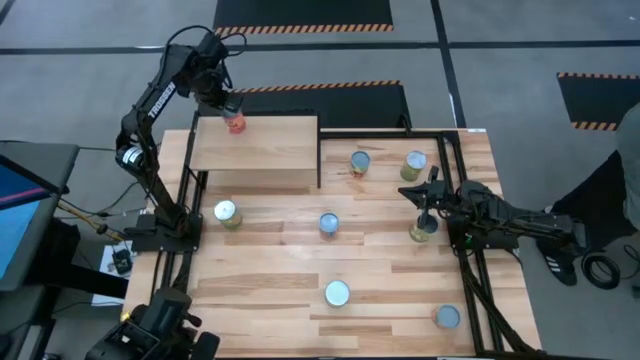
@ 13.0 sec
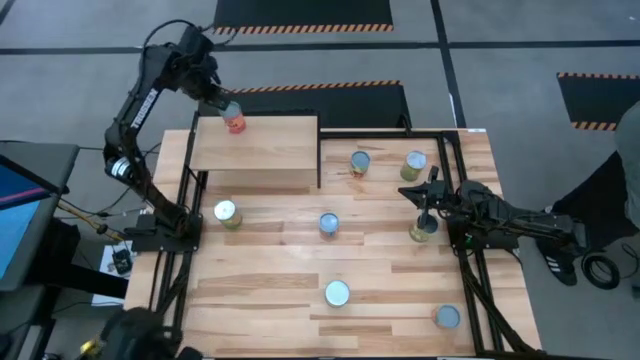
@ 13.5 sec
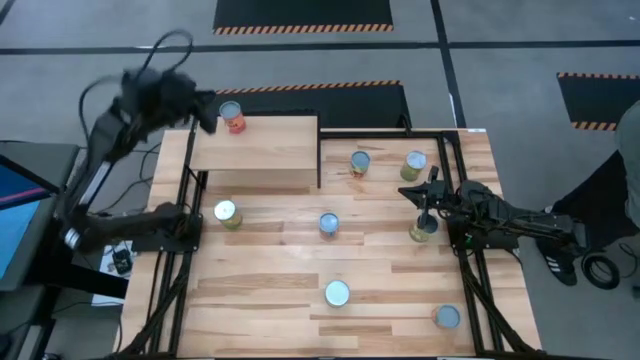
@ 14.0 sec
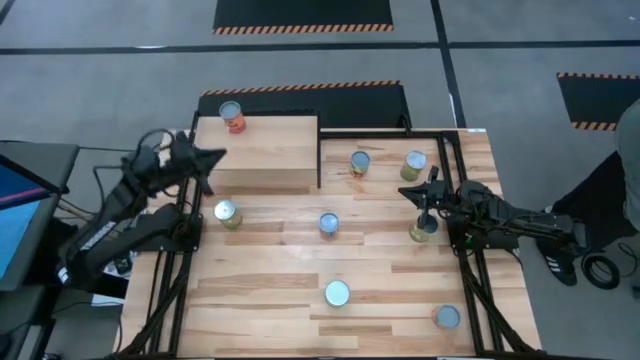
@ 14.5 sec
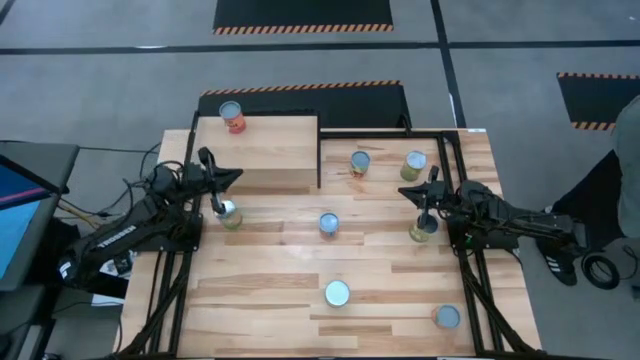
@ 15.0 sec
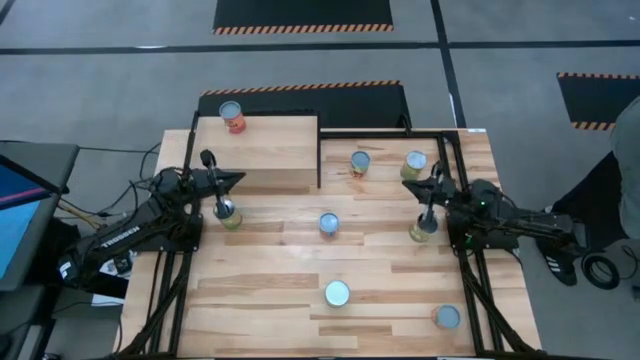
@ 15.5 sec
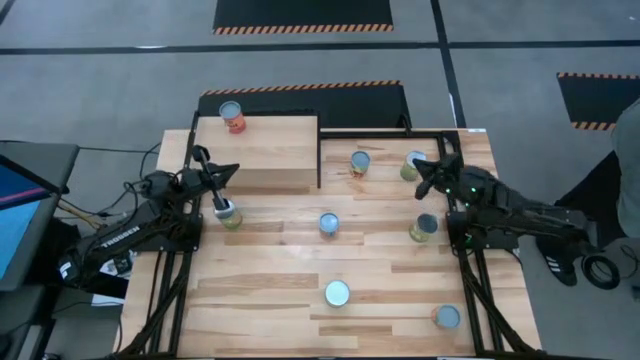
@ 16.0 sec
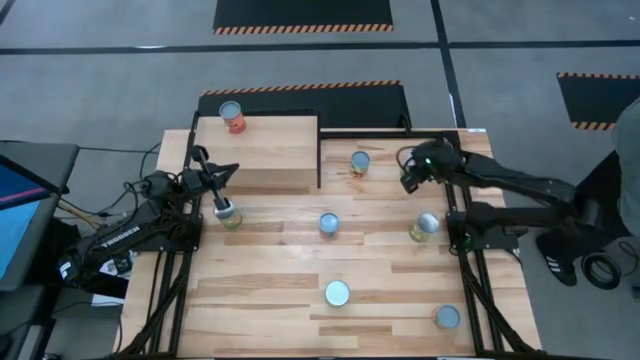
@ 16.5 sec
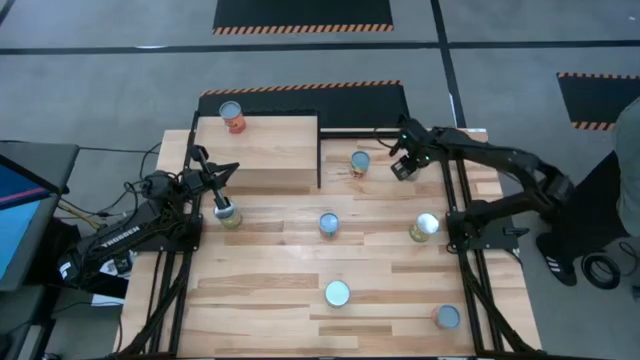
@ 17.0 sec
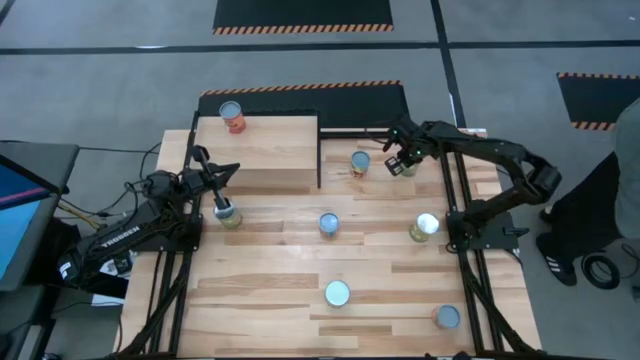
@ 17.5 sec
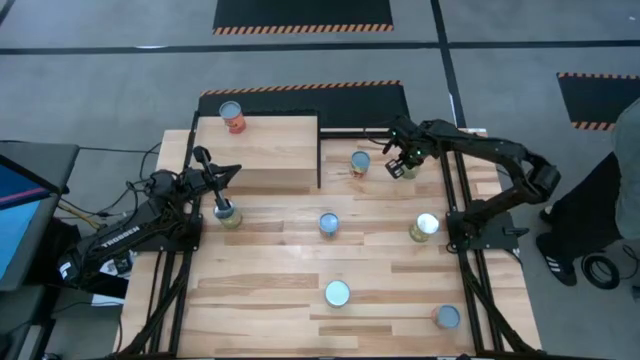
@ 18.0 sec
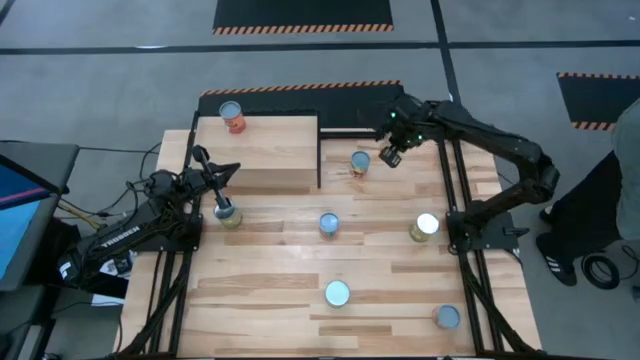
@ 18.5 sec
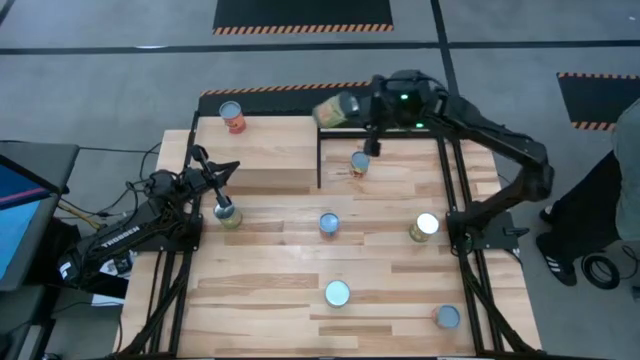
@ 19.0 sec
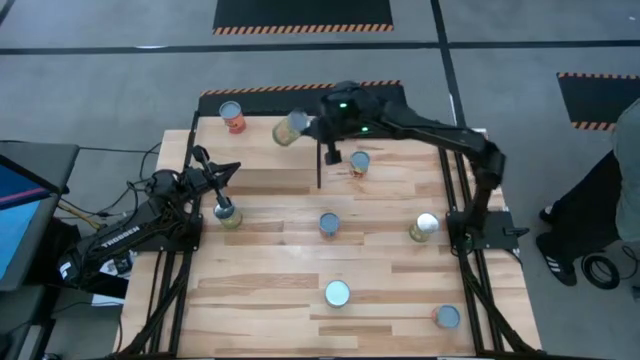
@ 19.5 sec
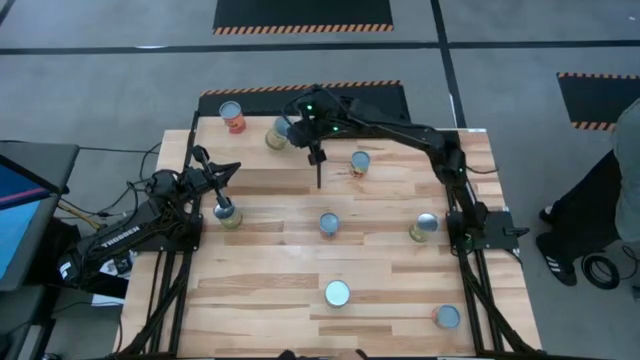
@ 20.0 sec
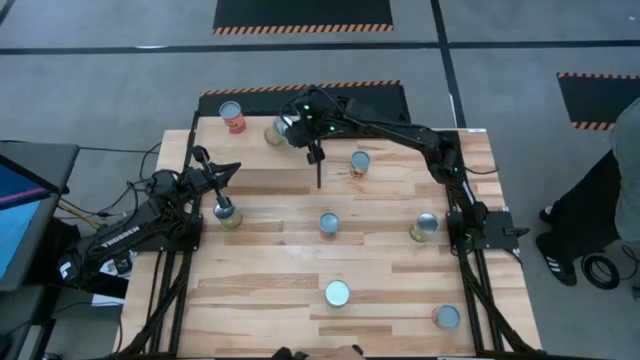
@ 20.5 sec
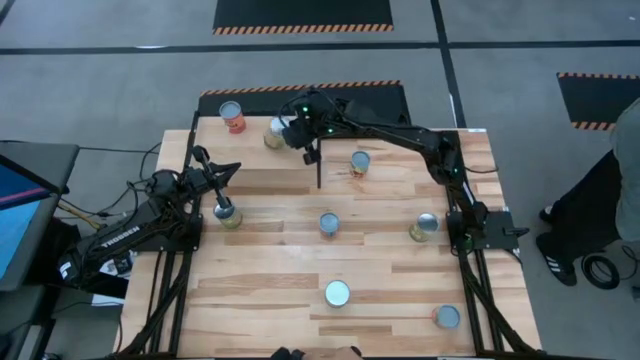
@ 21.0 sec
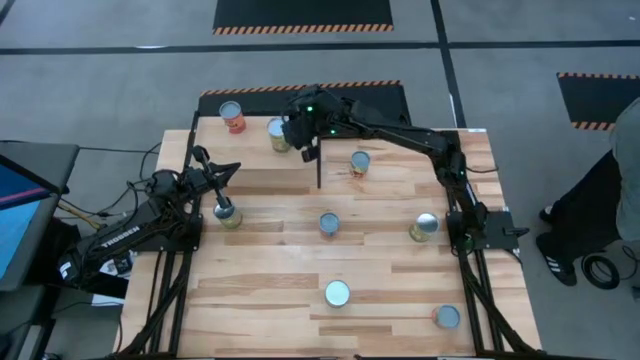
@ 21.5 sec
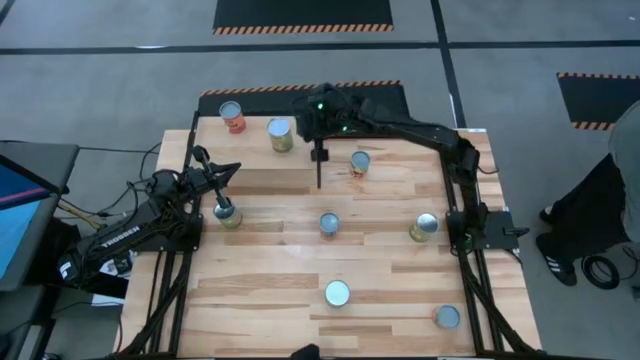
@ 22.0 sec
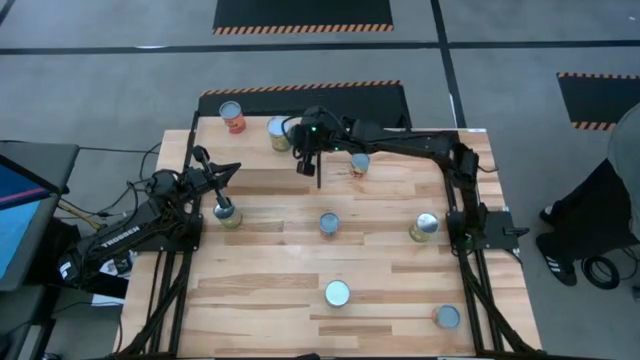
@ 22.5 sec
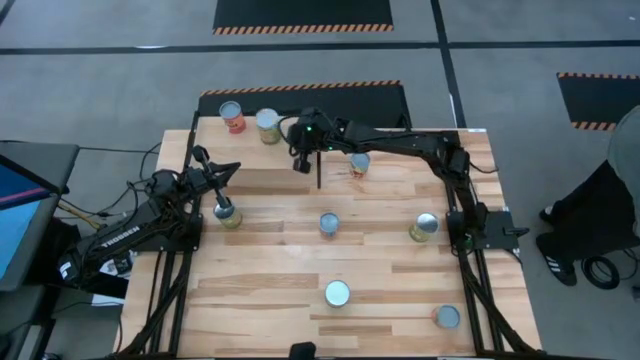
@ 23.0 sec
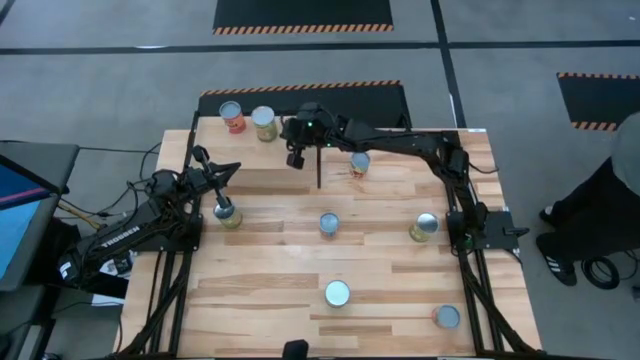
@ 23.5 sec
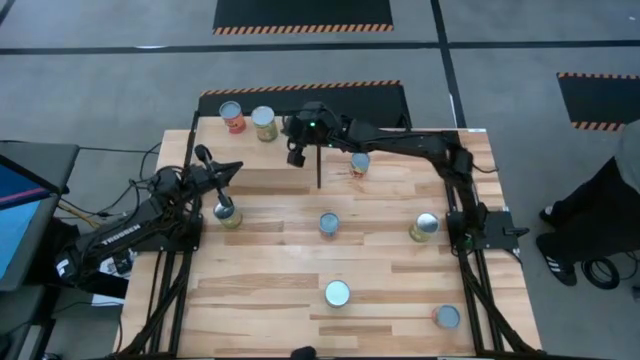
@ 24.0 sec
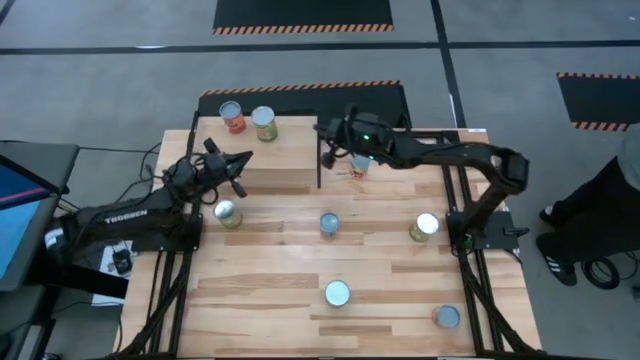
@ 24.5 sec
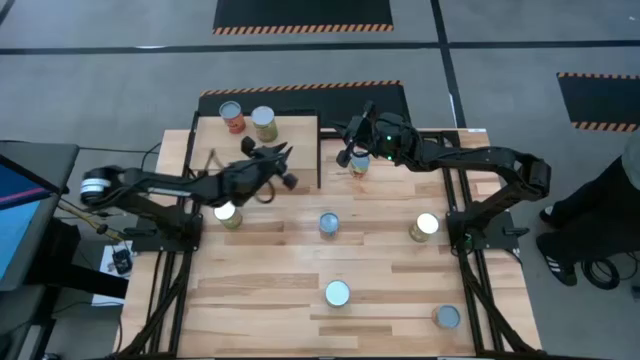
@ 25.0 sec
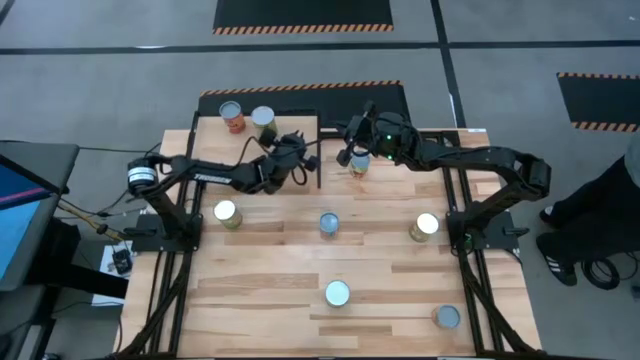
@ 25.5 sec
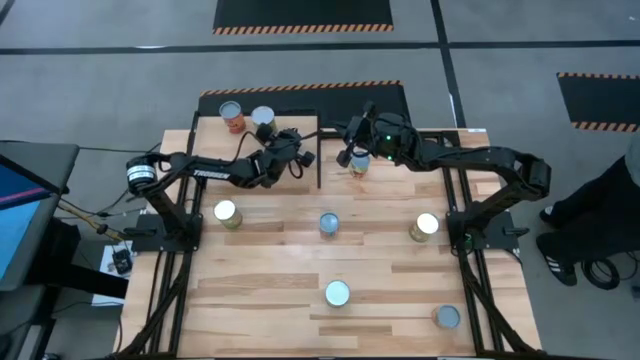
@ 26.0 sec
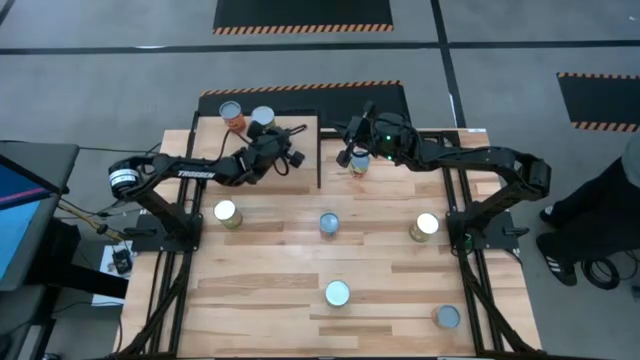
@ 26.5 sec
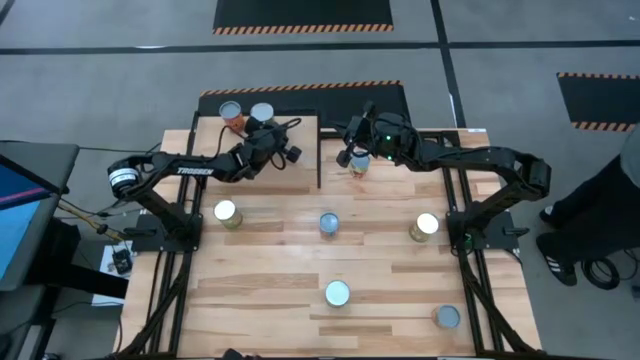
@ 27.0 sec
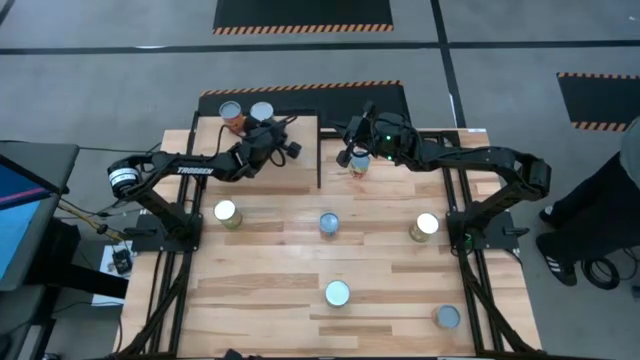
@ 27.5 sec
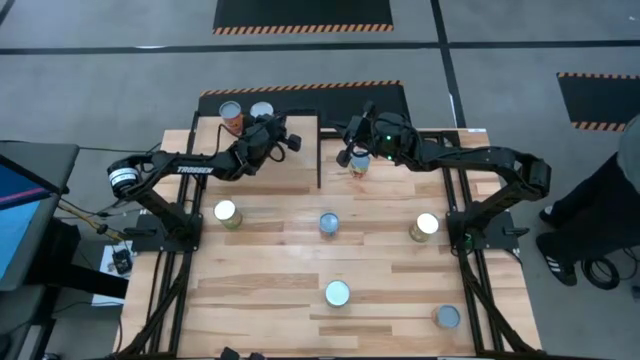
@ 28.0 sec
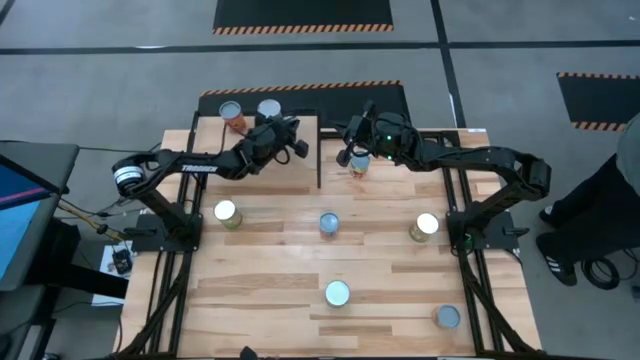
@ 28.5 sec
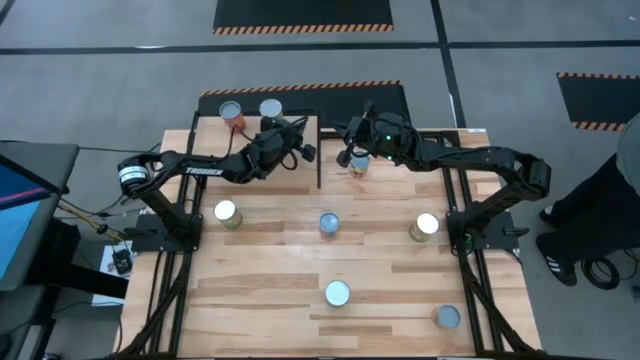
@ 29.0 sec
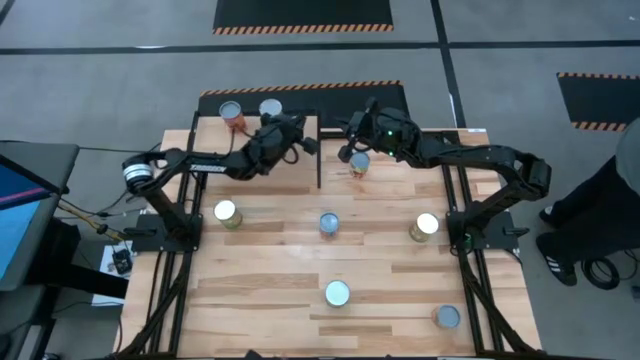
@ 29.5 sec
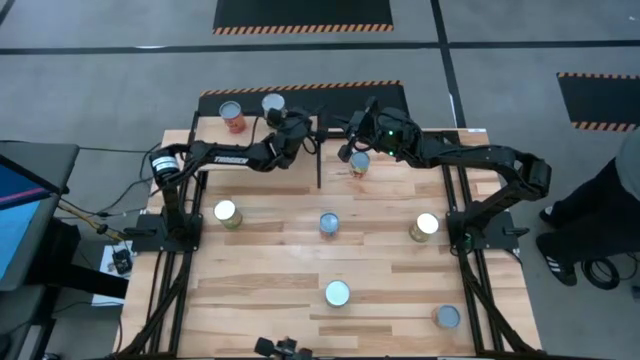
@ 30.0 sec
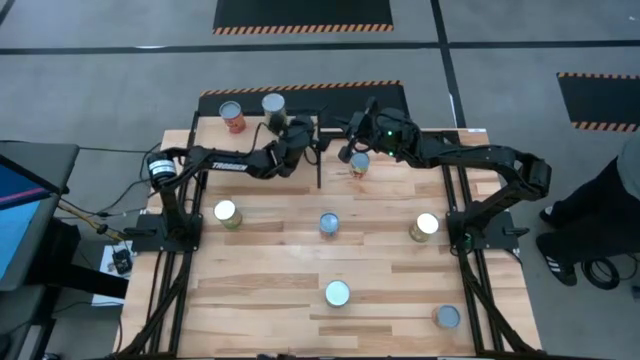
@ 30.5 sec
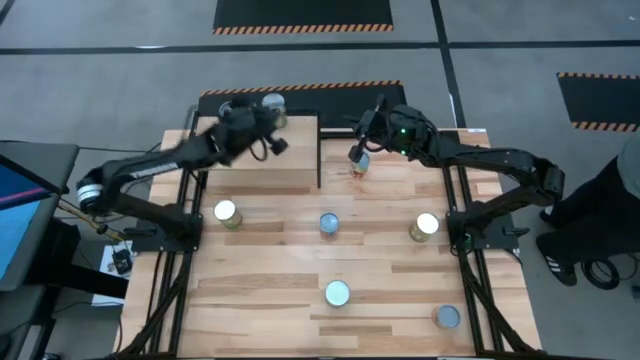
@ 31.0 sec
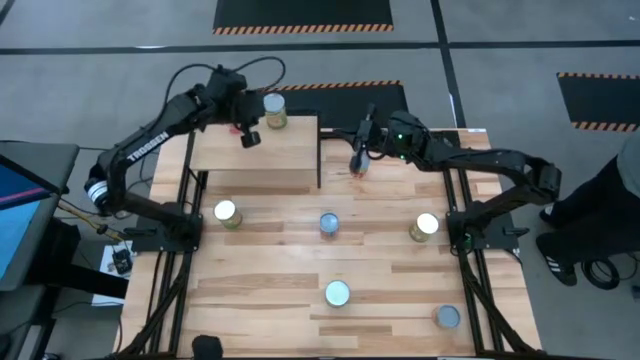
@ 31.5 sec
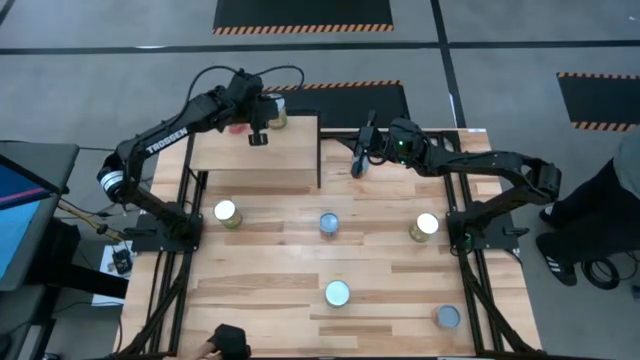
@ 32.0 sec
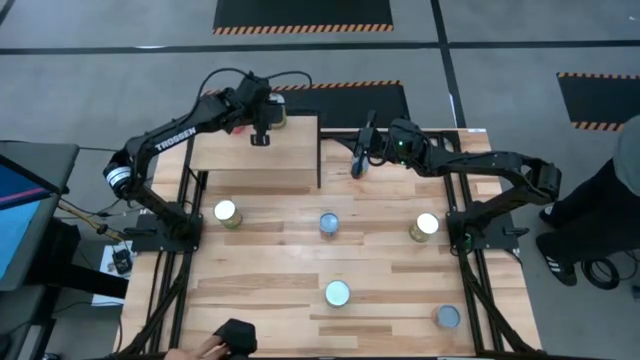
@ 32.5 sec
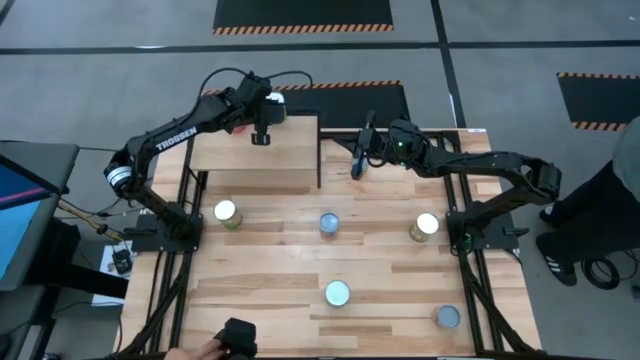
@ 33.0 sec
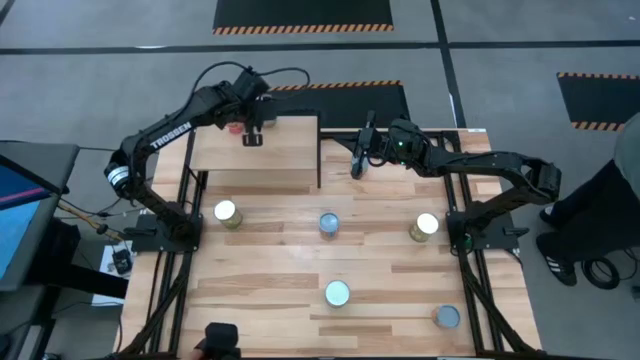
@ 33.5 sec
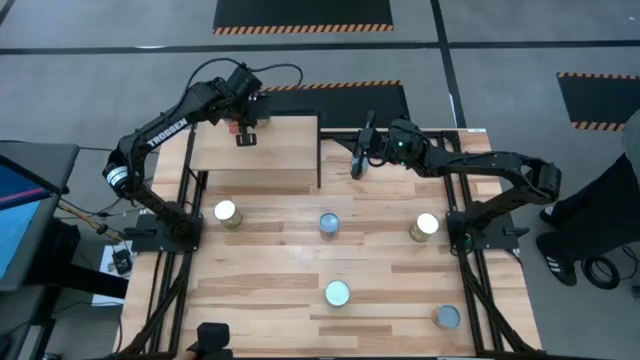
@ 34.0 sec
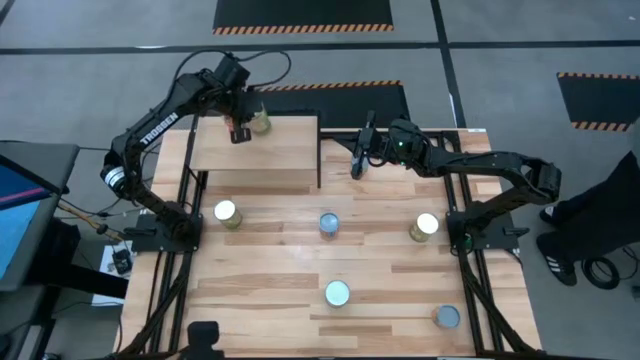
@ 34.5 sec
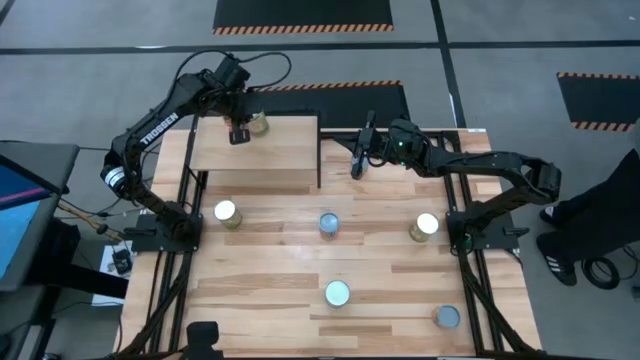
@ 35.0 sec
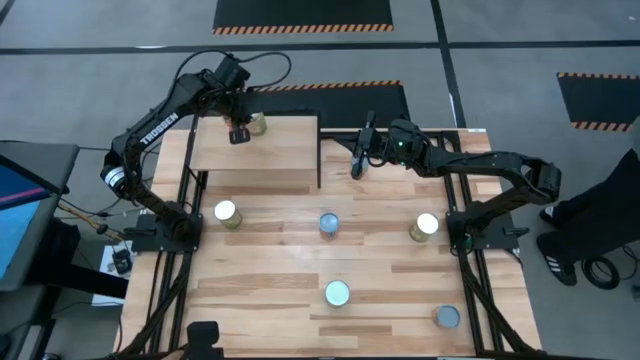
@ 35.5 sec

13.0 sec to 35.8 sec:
Task: Pick and place cans onto a shelf
Put the top canned oranges on the shelf
